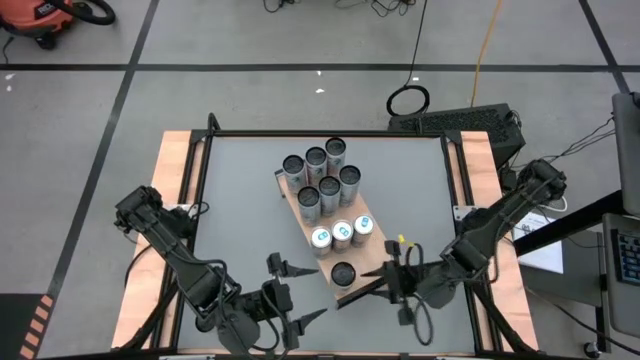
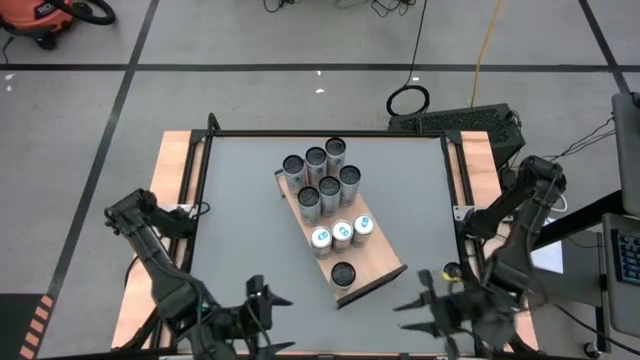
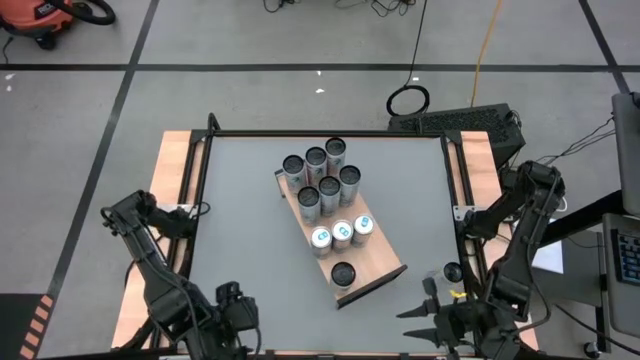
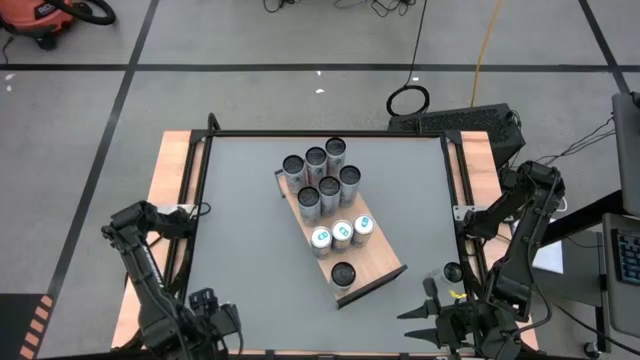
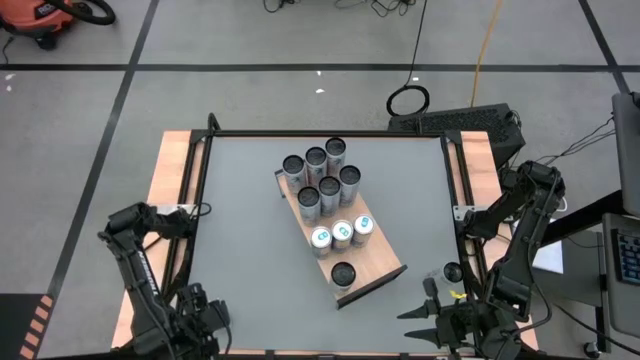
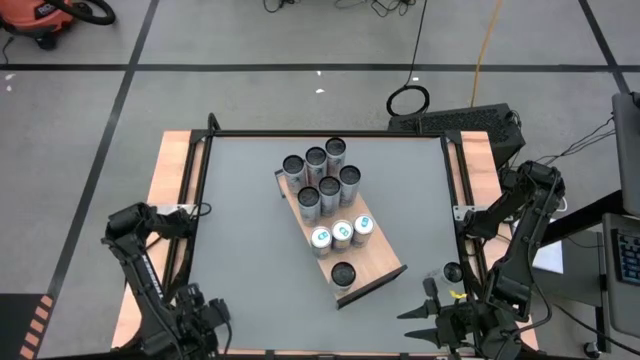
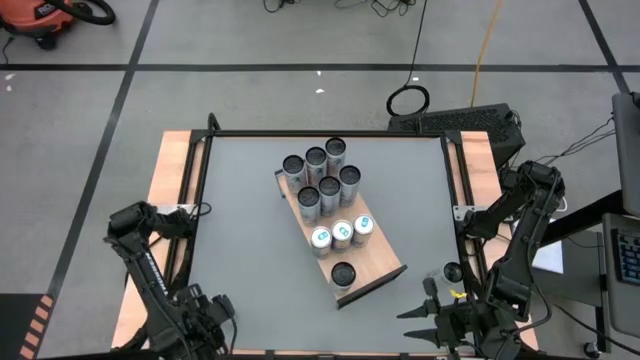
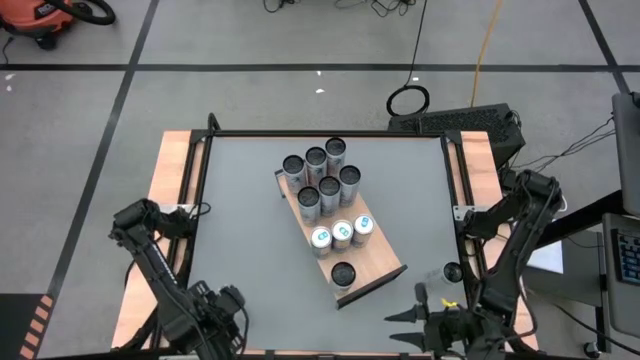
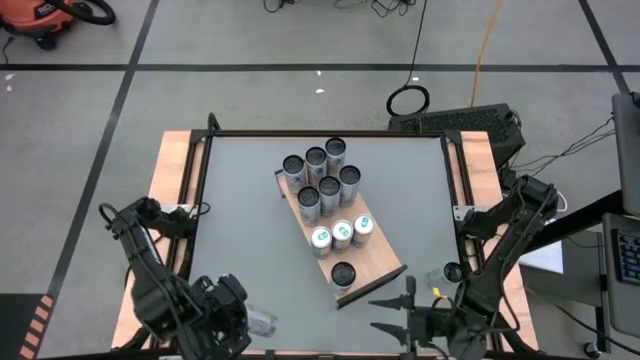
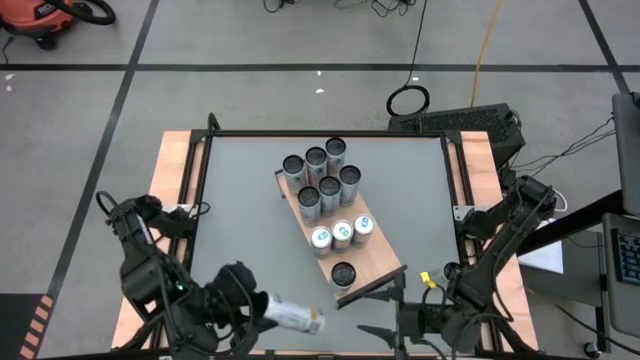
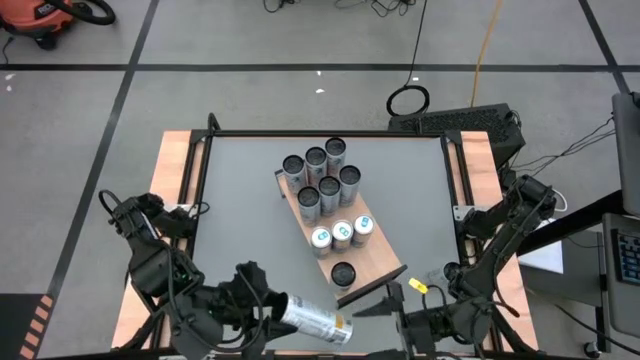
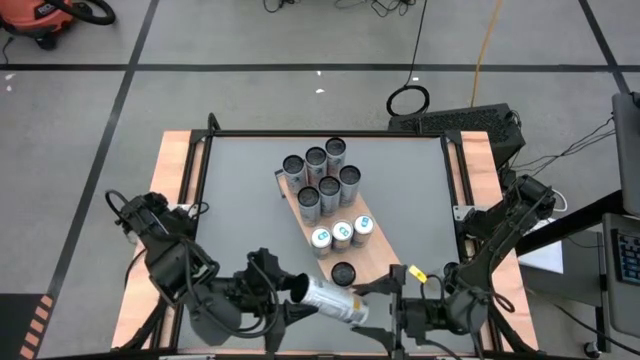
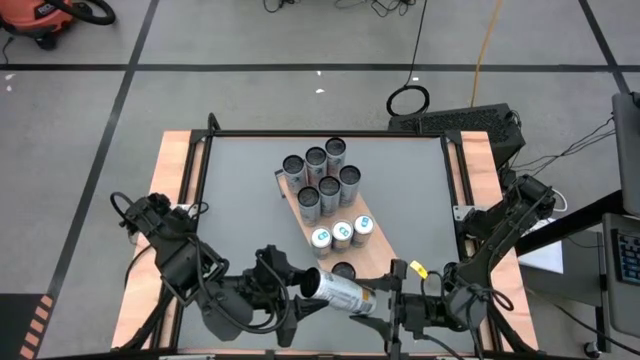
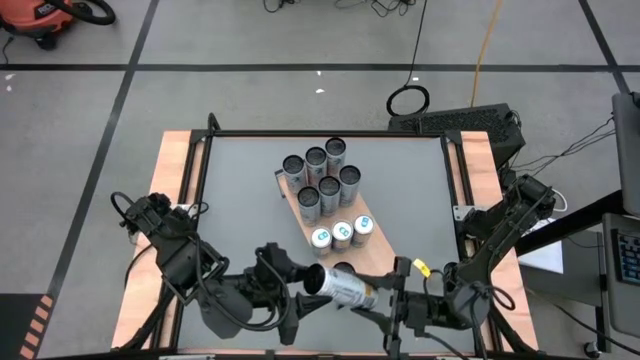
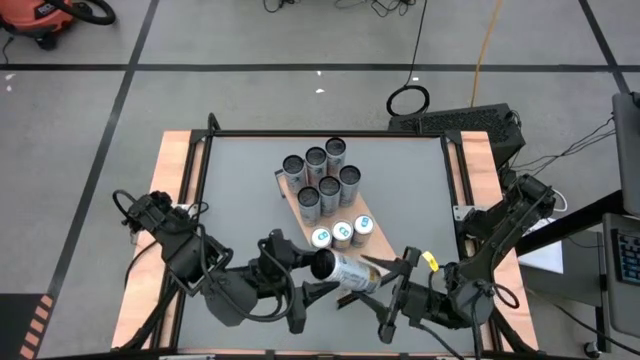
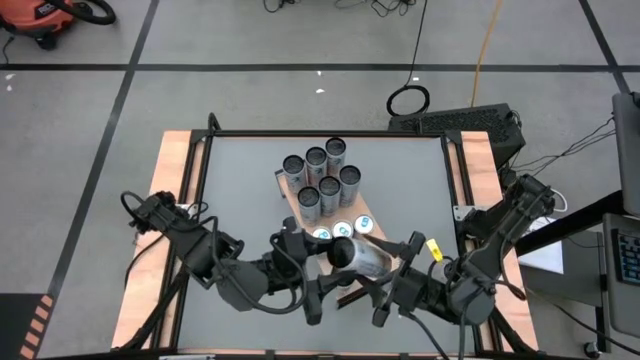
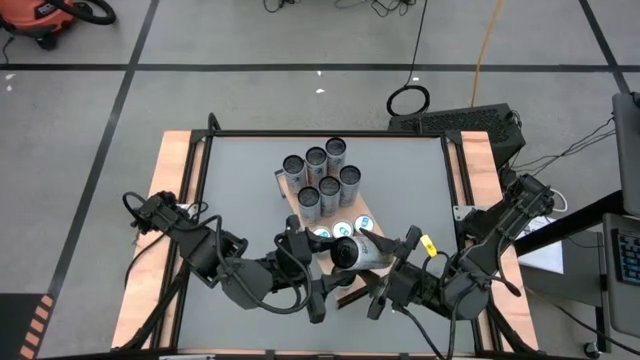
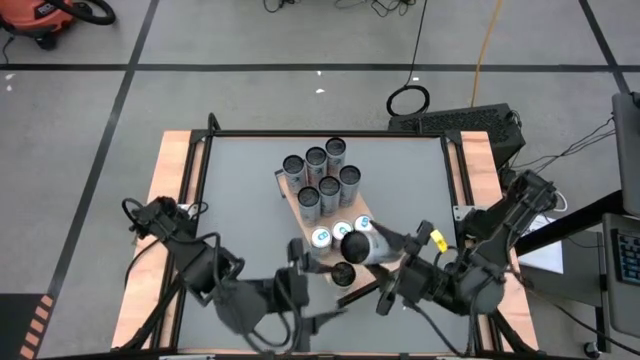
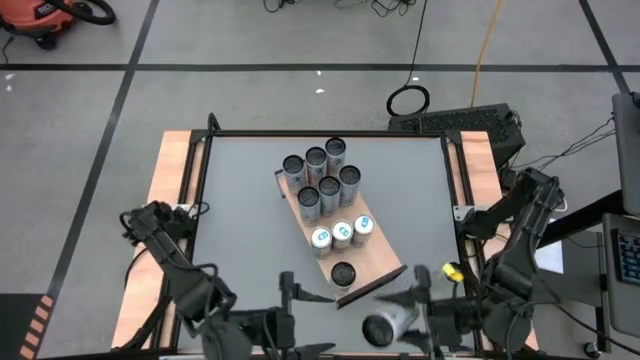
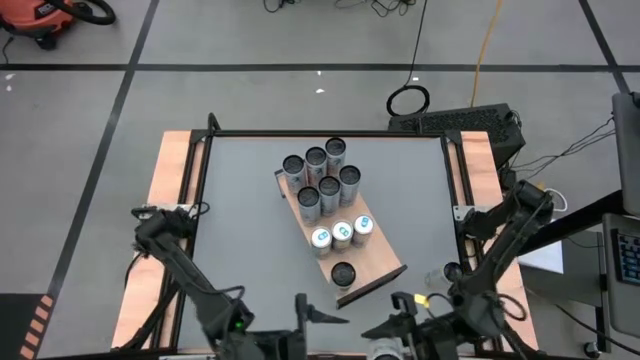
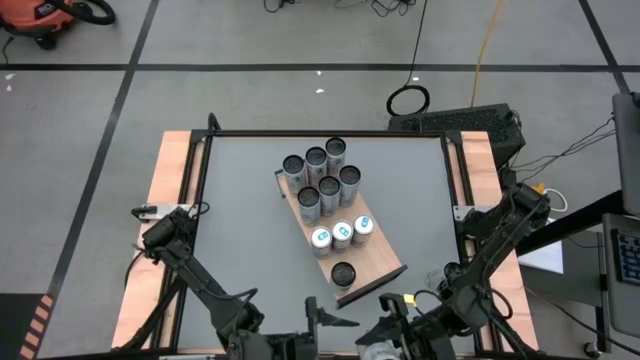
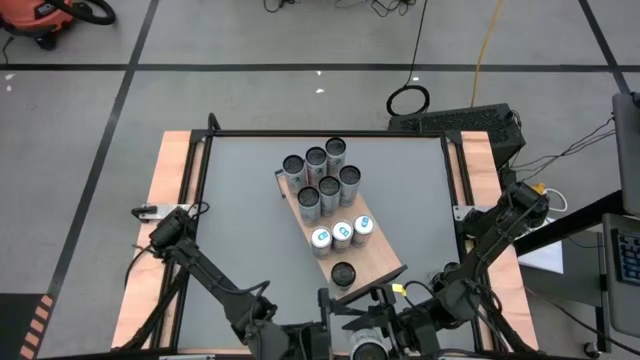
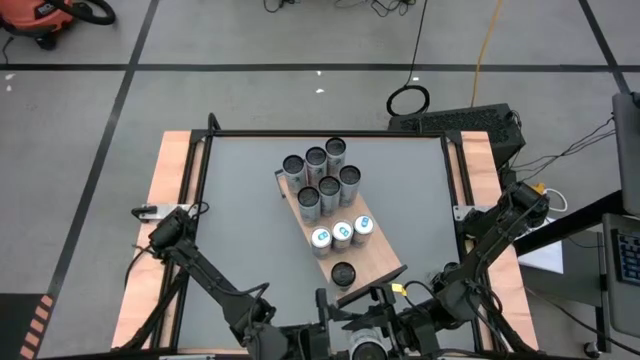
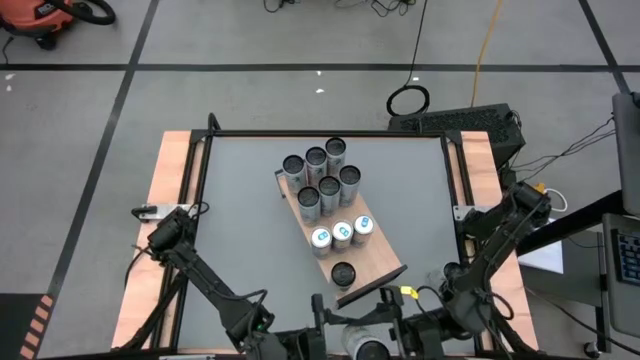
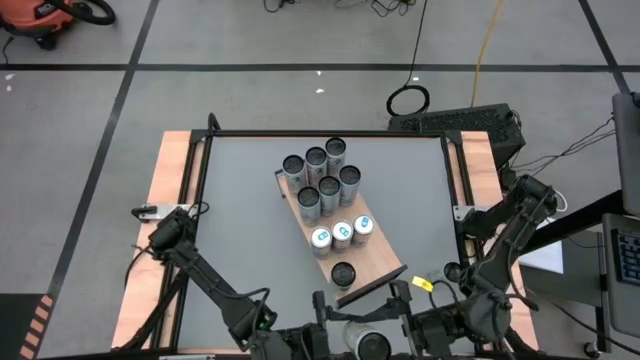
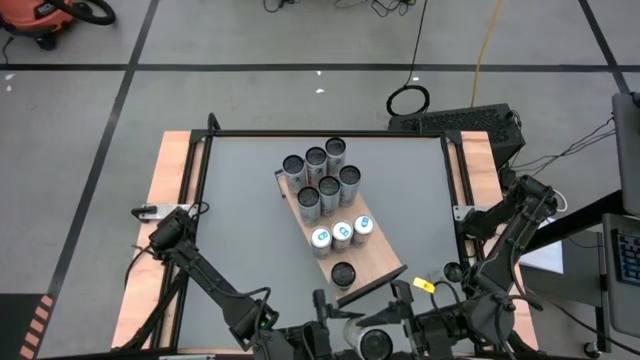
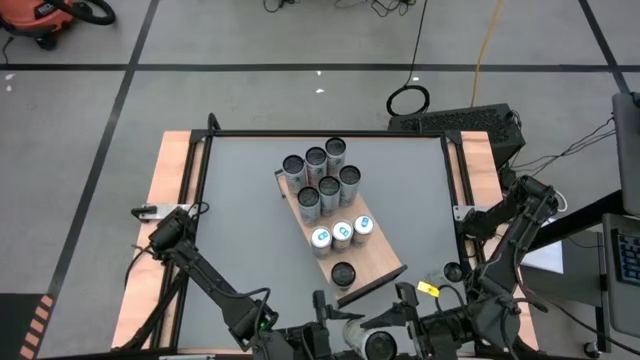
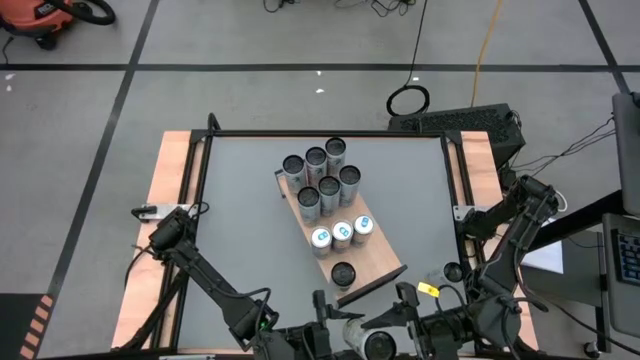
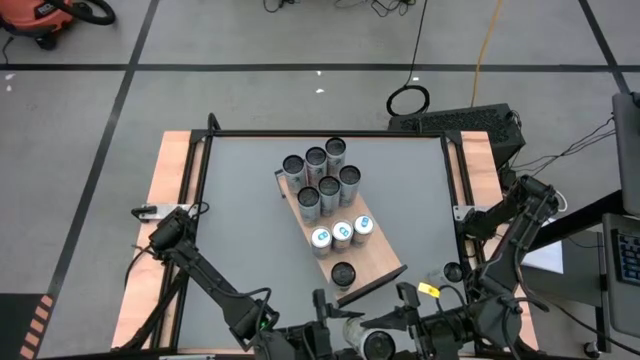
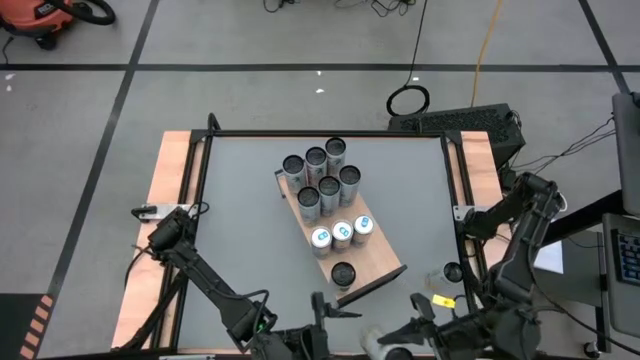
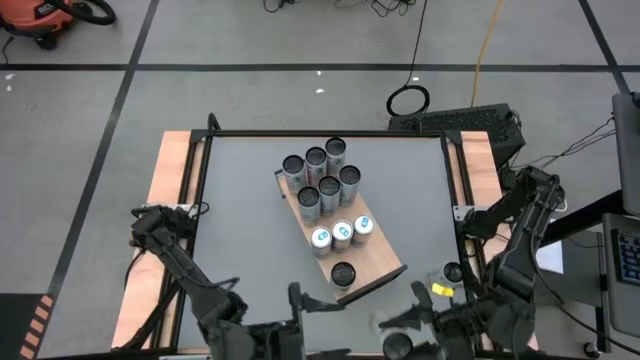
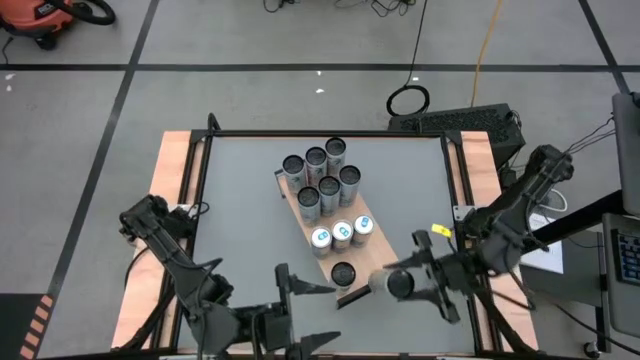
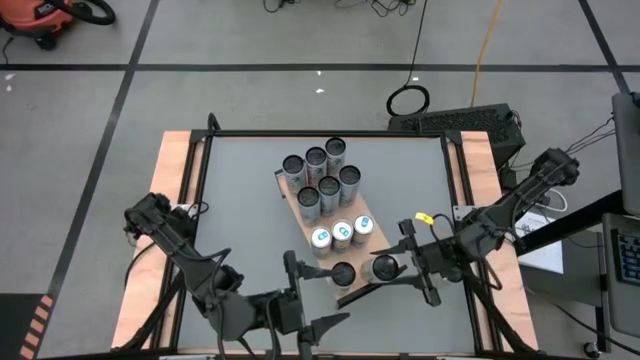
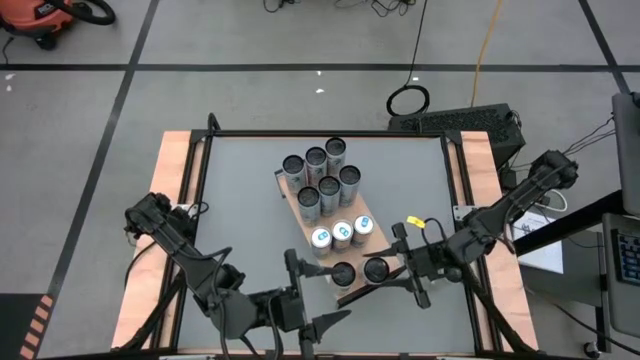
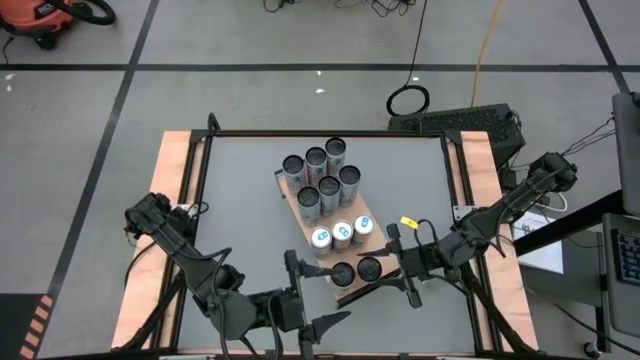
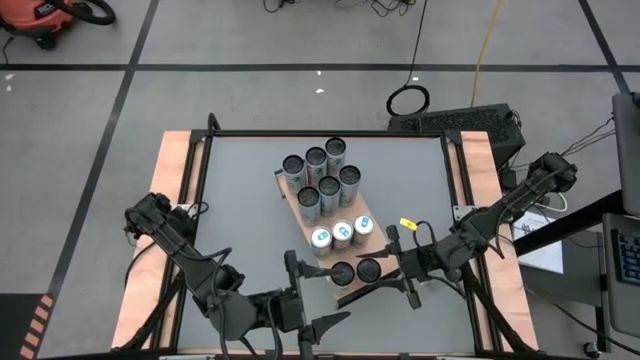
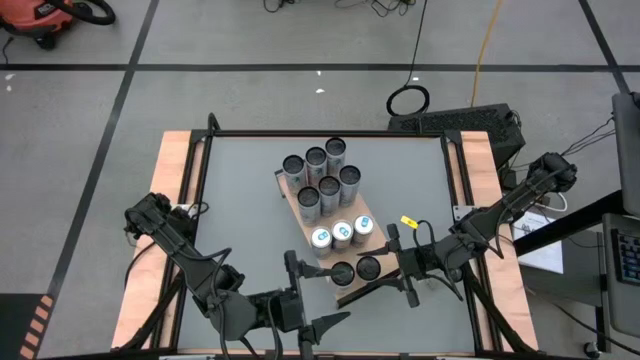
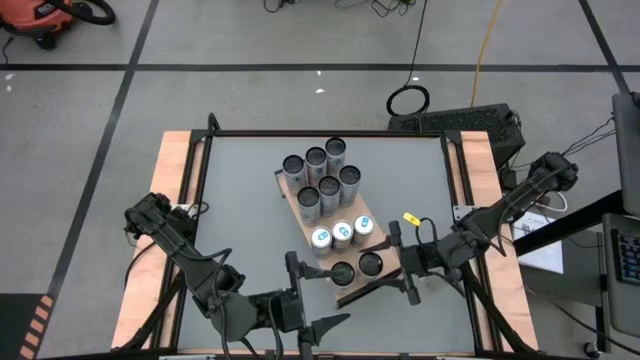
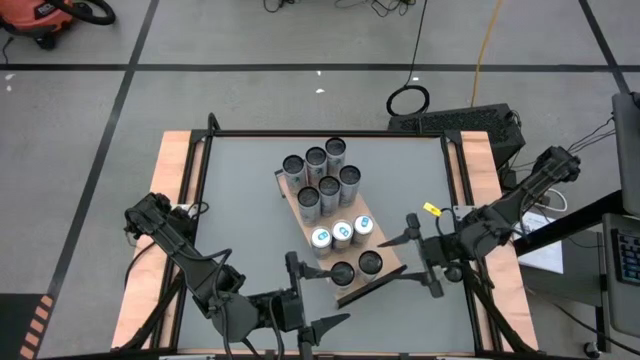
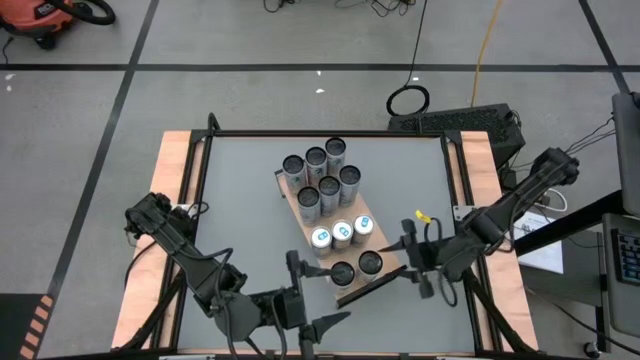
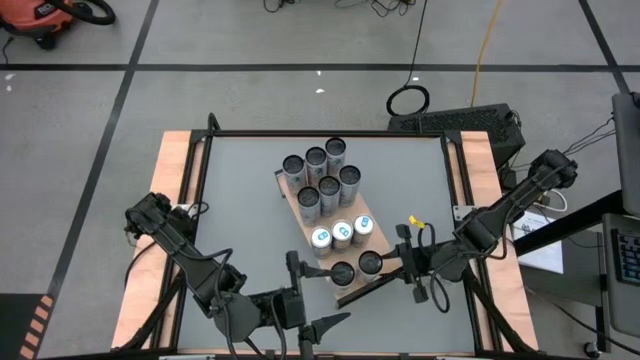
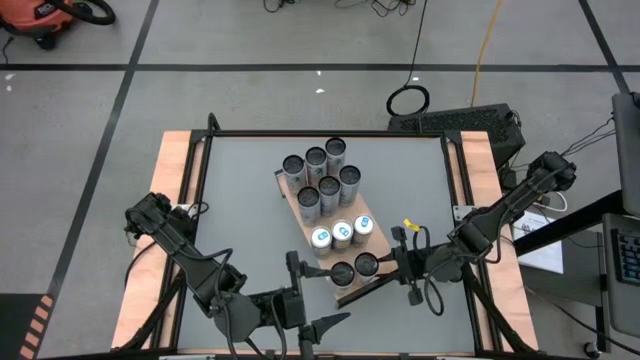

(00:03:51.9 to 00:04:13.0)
Task: Place canned beverage on shelf
Put the bottom white-yellow soda can on the shelf aligned with the other white-yellow soda can
